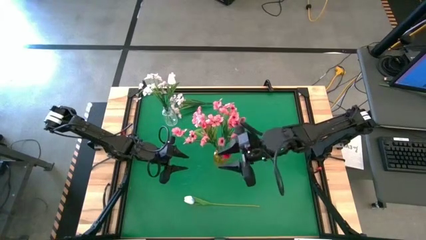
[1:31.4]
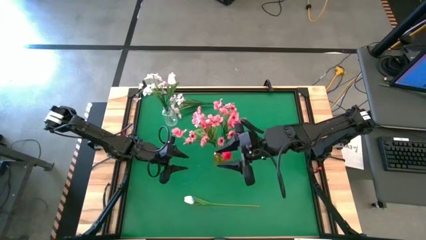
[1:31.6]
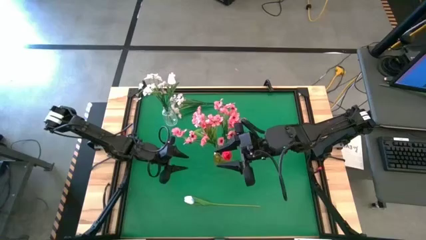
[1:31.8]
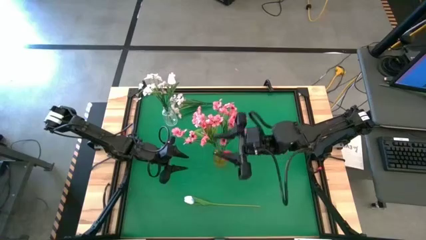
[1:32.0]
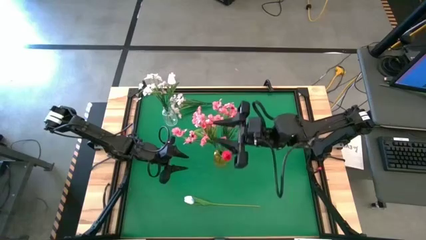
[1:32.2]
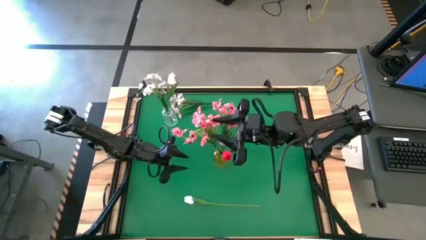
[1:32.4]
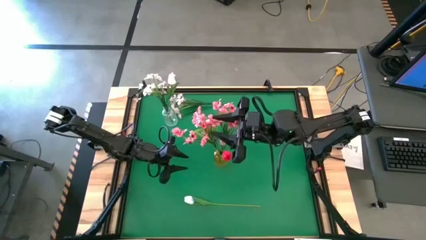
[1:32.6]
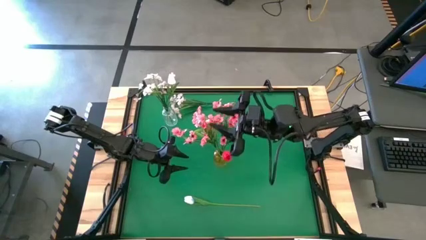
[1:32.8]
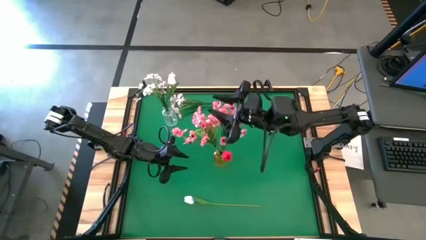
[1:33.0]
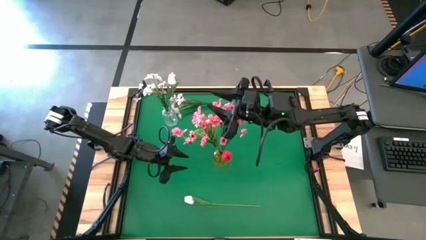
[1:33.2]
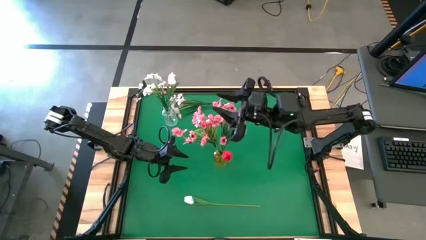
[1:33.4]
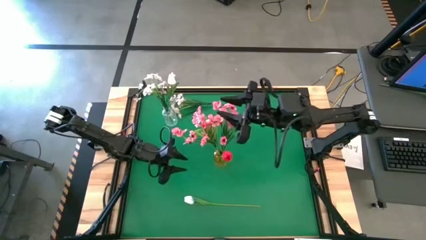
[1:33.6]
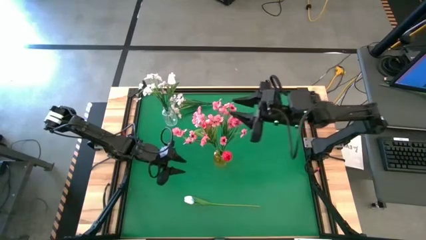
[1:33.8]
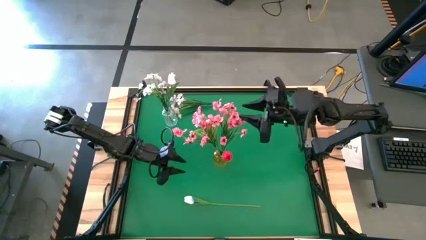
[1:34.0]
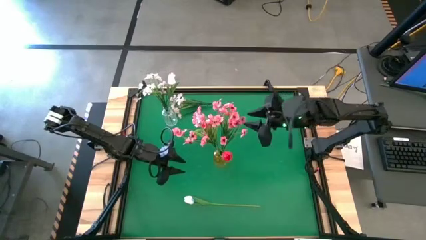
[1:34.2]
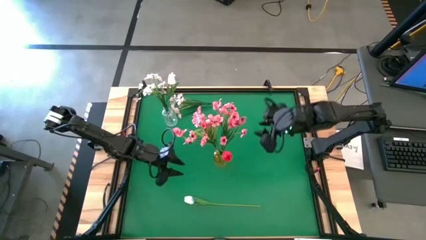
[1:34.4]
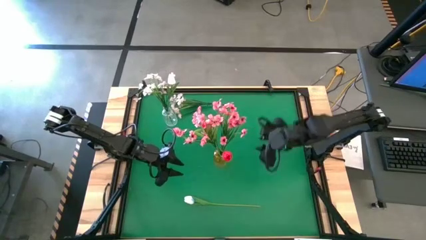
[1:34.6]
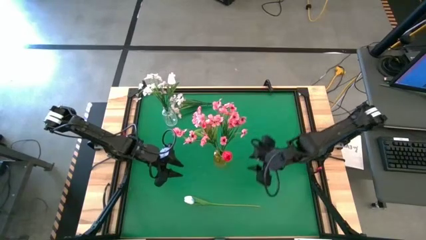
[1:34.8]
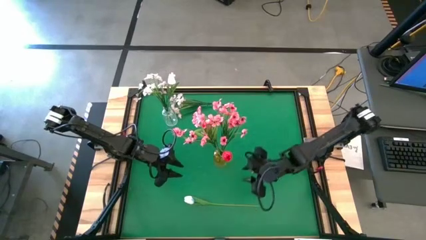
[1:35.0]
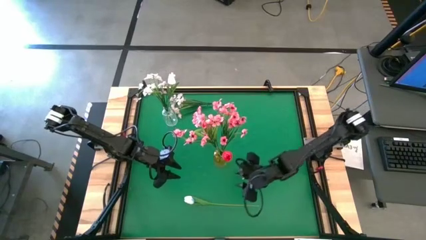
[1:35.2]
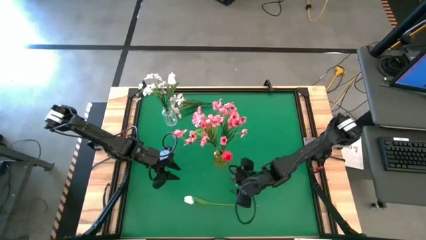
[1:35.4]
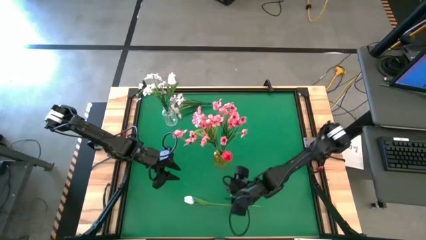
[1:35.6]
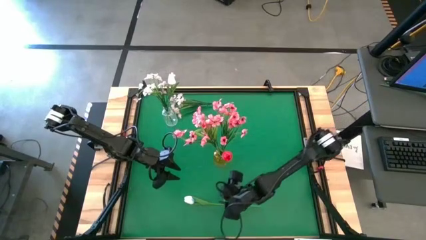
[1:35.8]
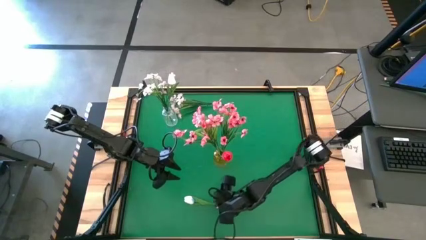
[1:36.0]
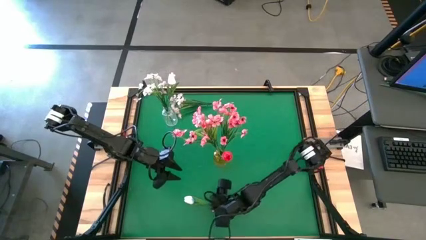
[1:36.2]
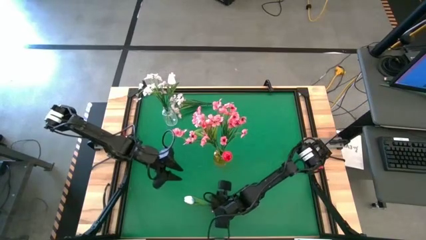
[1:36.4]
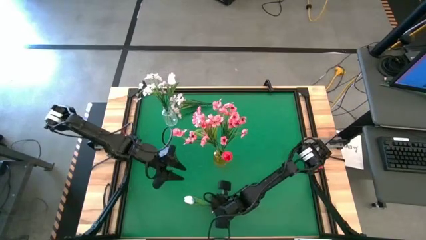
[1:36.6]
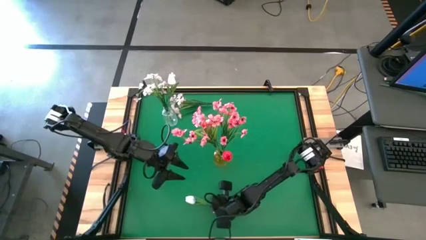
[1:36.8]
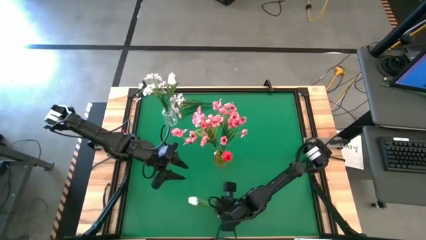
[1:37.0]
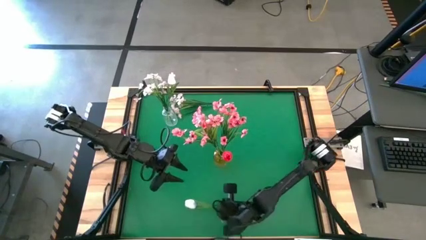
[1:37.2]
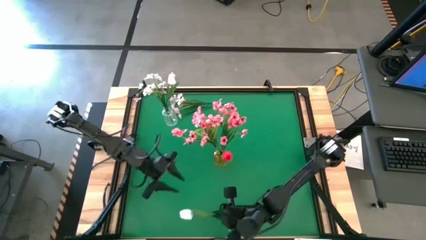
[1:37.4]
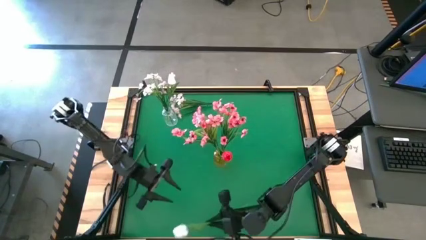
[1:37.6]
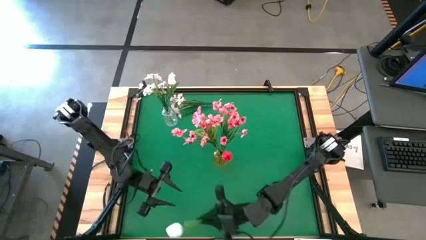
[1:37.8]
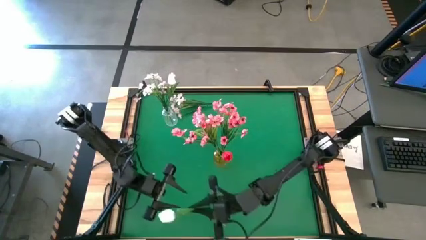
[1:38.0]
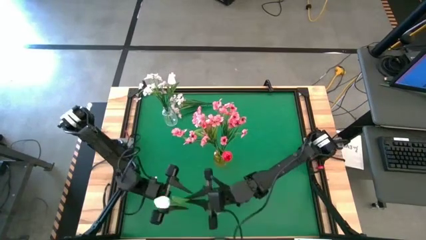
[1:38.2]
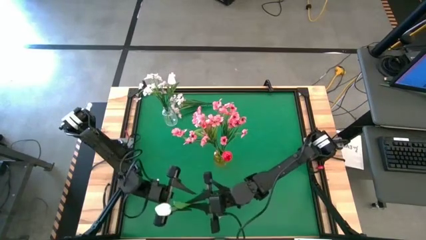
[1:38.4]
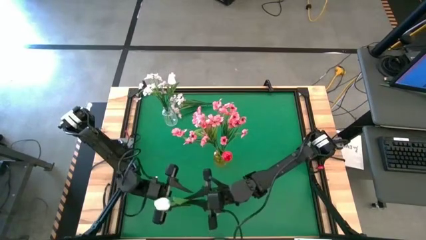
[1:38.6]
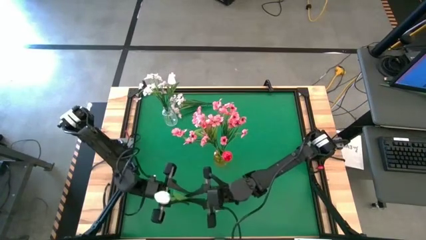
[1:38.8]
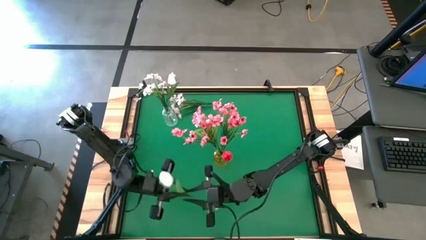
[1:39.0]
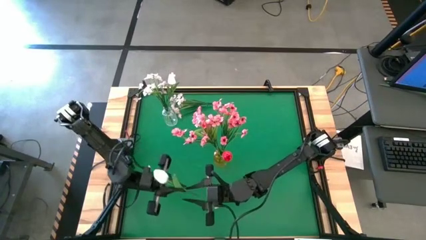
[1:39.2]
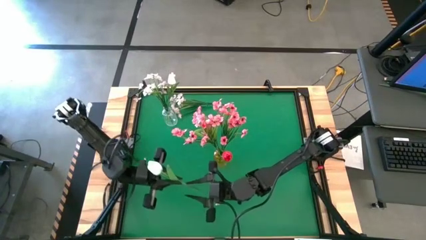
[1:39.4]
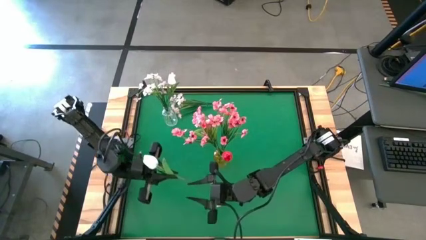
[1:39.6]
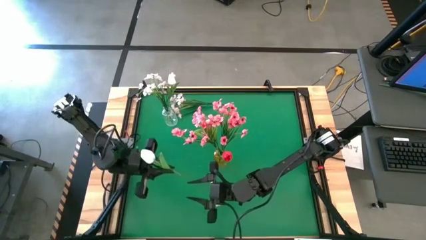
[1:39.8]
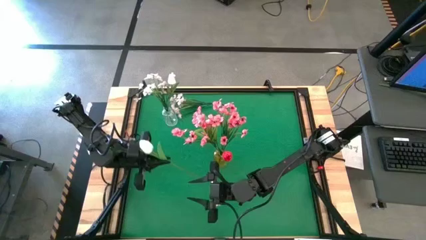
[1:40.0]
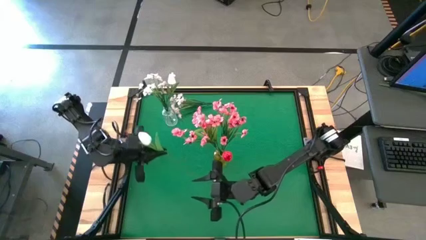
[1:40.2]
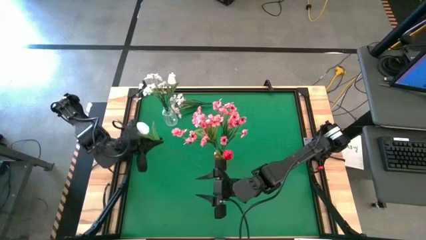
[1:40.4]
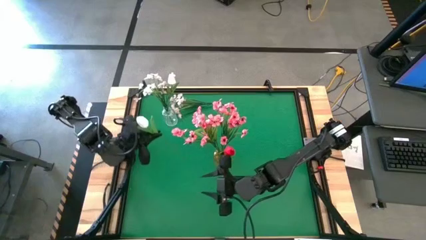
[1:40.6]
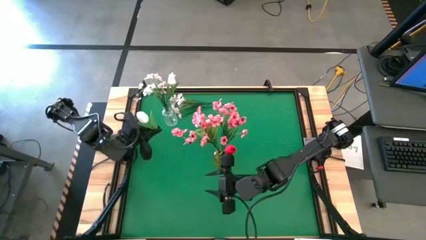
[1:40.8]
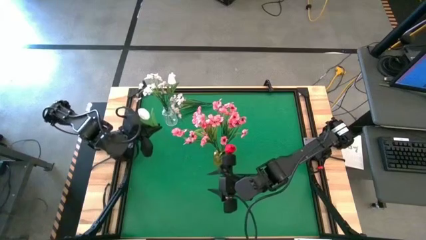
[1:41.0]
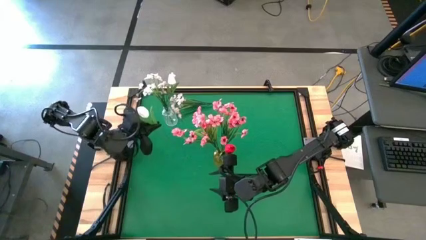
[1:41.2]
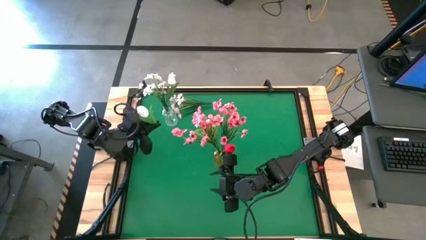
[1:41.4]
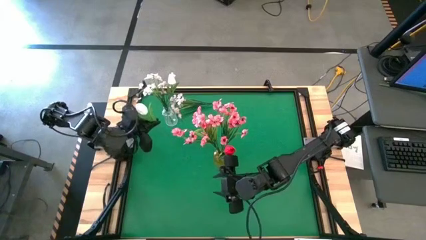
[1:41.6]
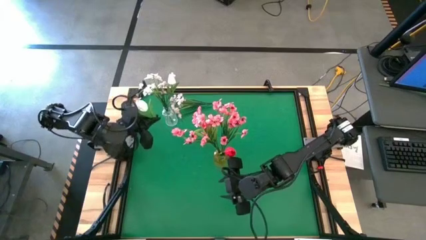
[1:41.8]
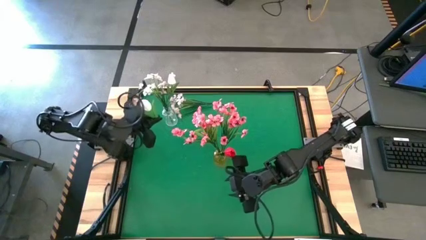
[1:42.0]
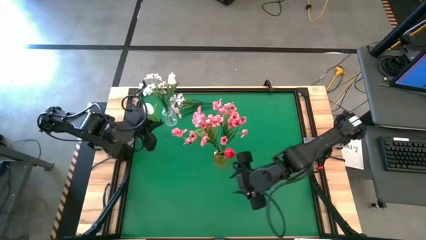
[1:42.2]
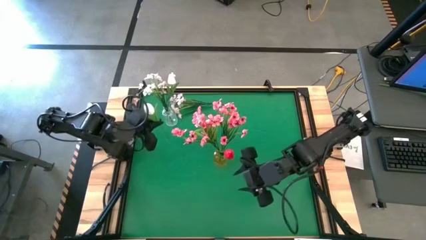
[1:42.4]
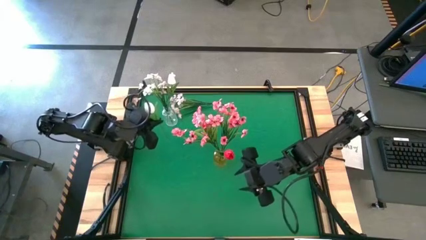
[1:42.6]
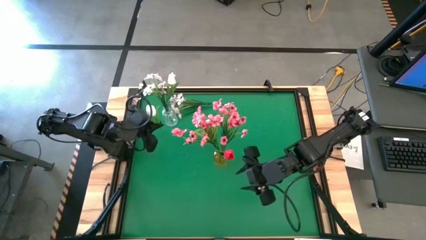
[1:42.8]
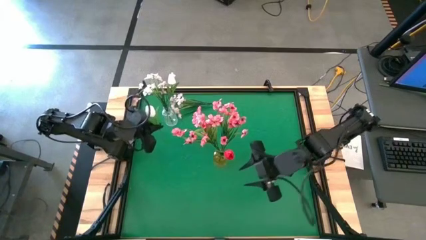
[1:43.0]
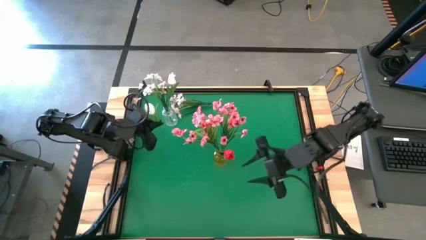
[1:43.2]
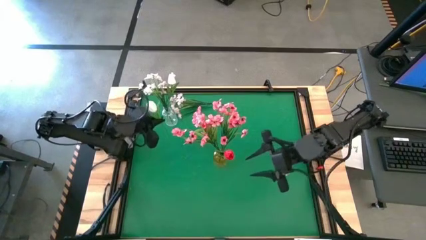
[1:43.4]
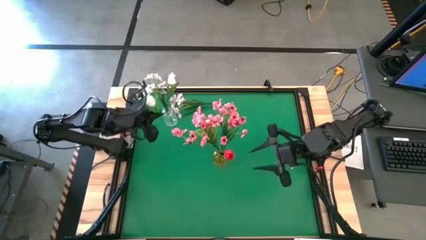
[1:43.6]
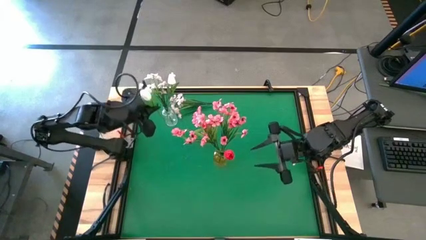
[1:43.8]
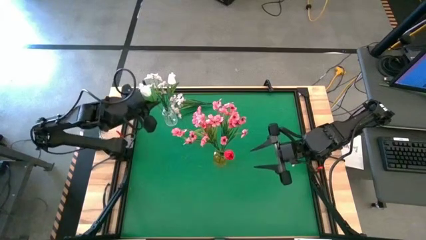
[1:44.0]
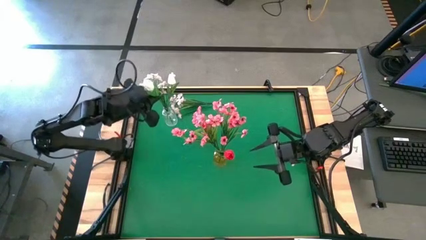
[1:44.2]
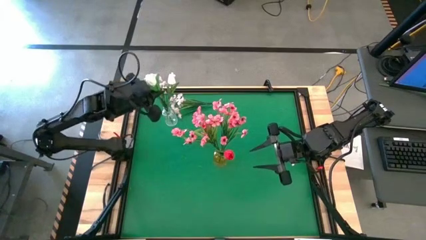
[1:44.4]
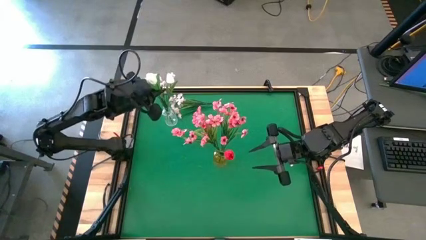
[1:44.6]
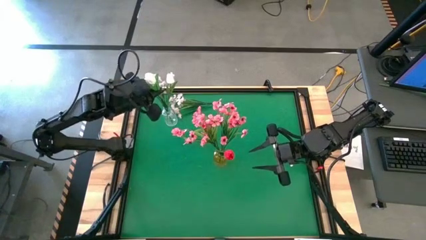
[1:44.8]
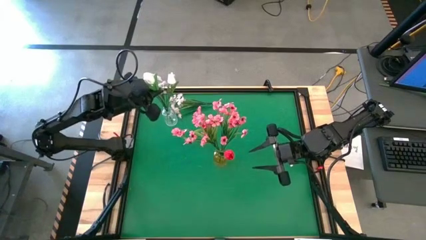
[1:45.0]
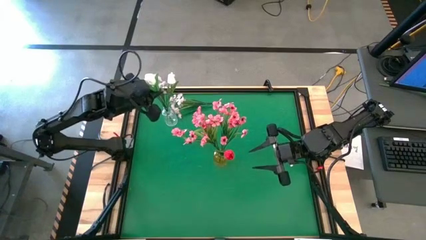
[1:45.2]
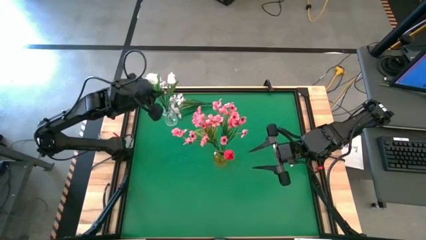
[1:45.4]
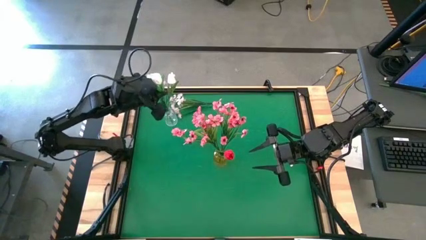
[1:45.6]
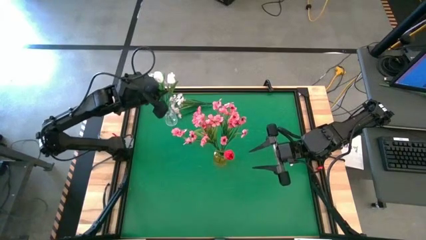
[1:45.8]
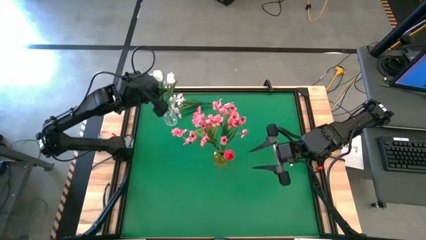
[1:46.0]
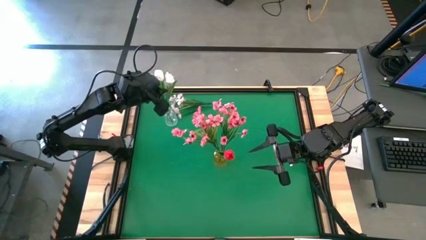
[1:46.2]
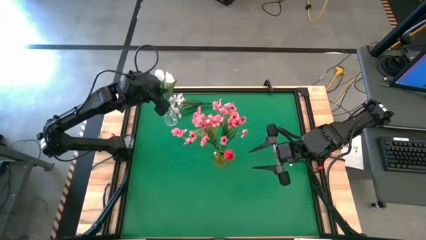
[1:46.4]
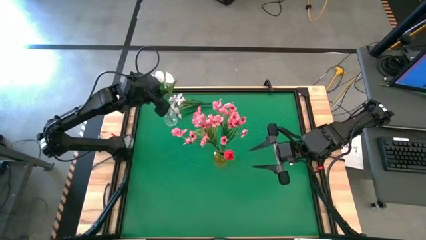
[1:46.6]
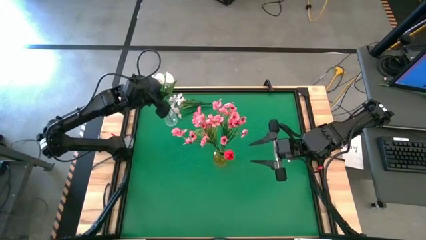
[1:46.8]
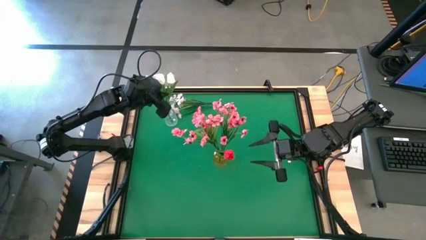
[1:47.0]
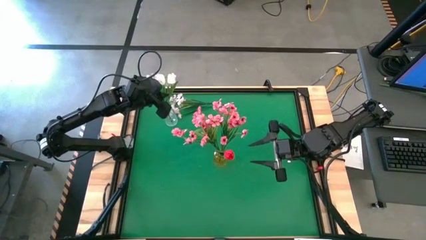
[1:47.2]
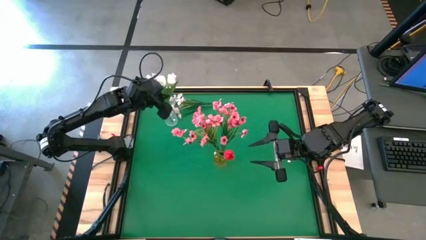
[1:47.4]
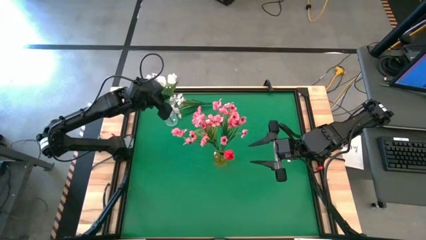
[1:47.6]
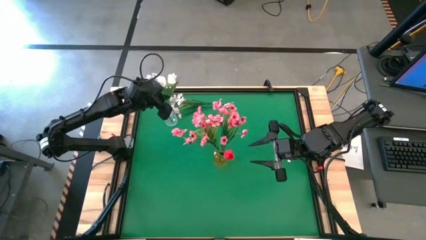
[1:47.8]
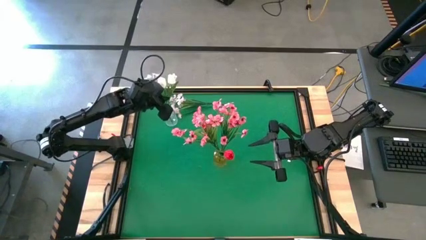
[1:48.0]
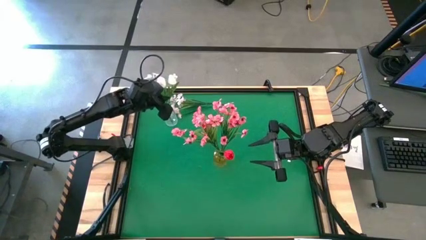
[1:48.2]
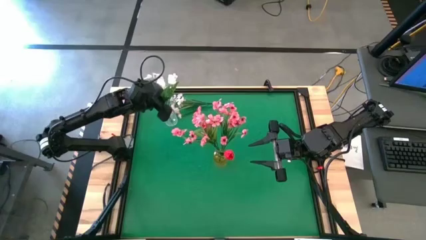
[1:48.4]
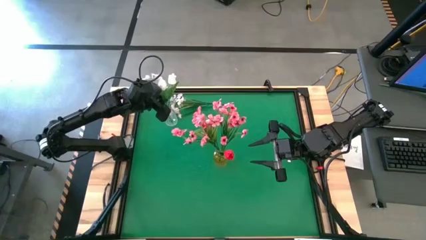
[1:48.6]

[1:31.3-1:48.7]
Task: Sort flowers into vase by color
Put the white tulip into the transparent vase
